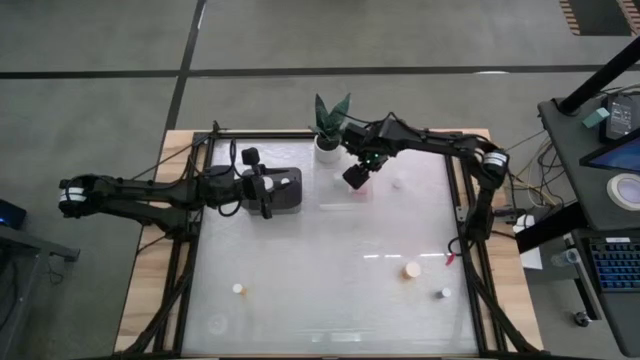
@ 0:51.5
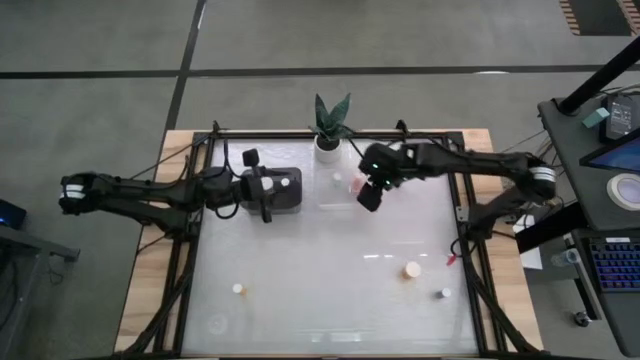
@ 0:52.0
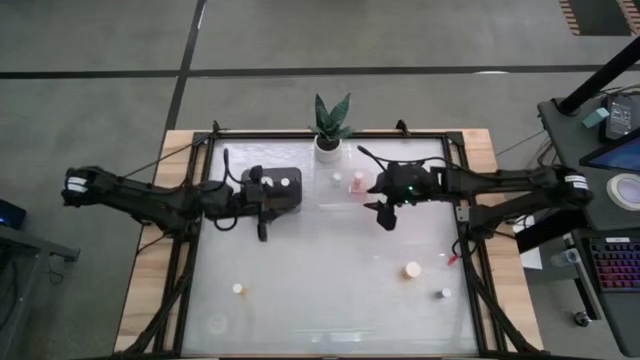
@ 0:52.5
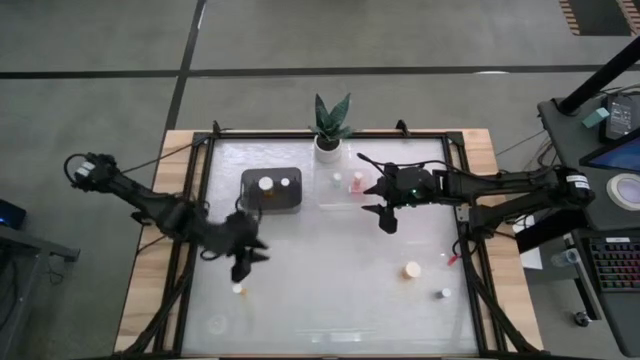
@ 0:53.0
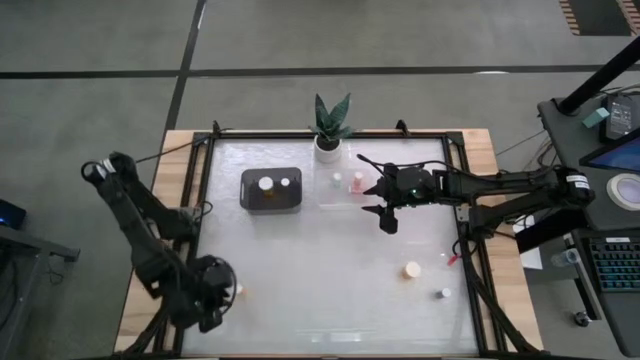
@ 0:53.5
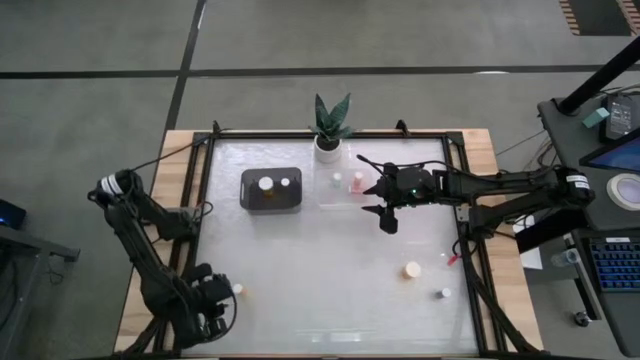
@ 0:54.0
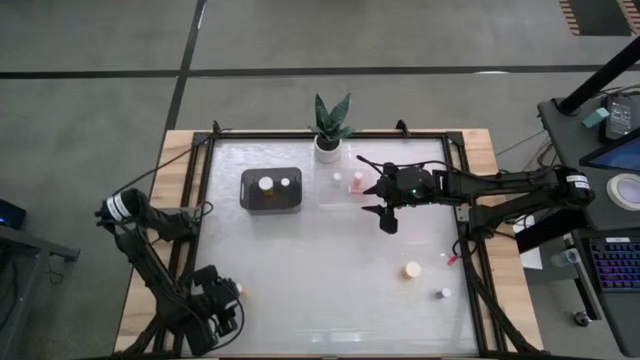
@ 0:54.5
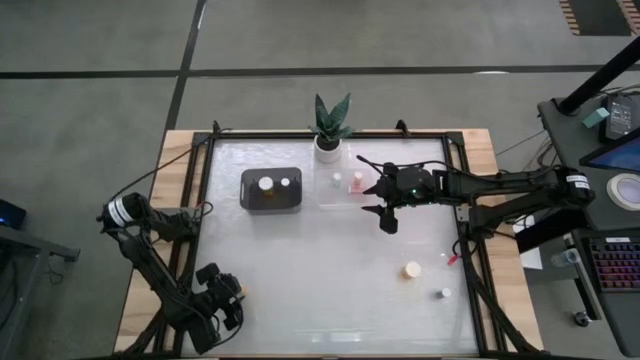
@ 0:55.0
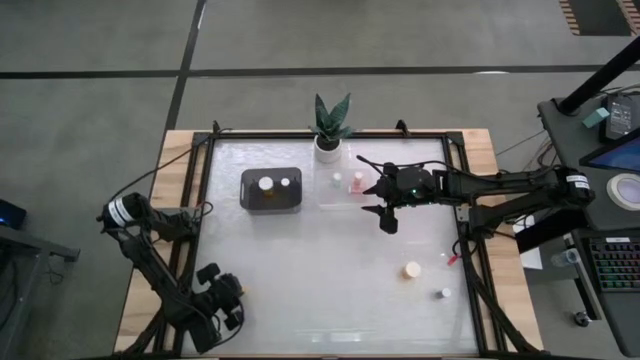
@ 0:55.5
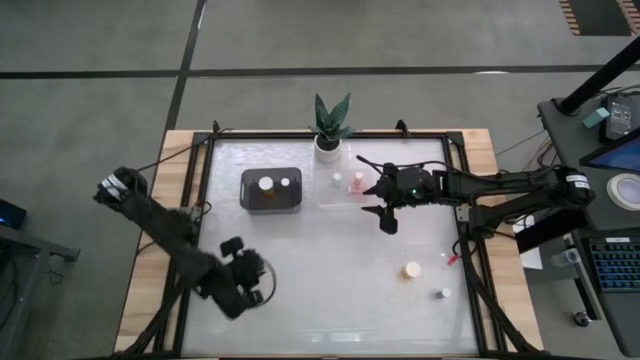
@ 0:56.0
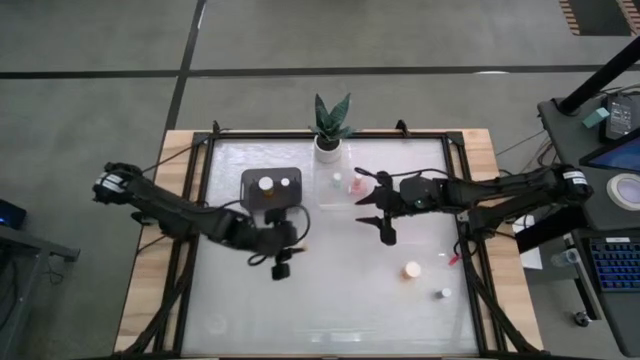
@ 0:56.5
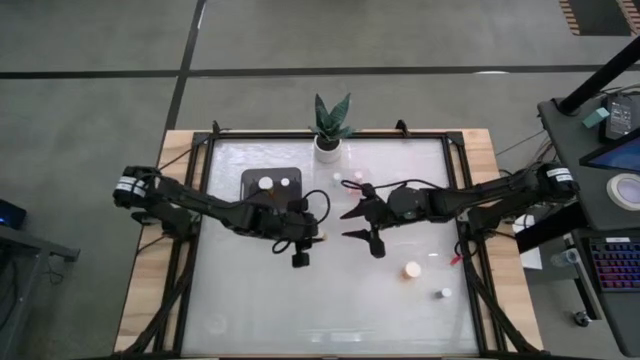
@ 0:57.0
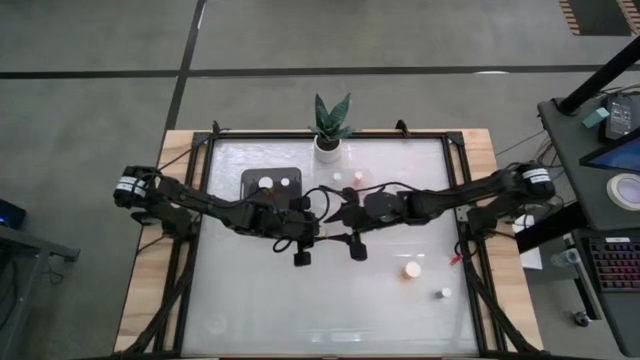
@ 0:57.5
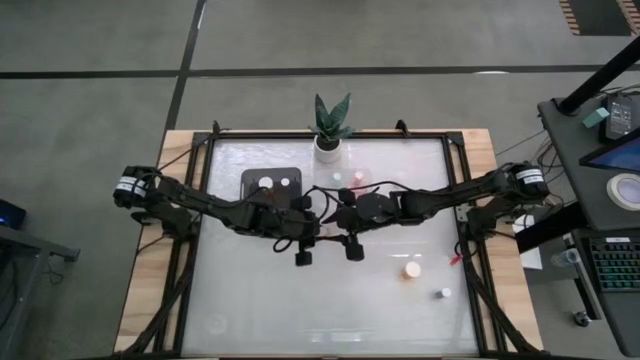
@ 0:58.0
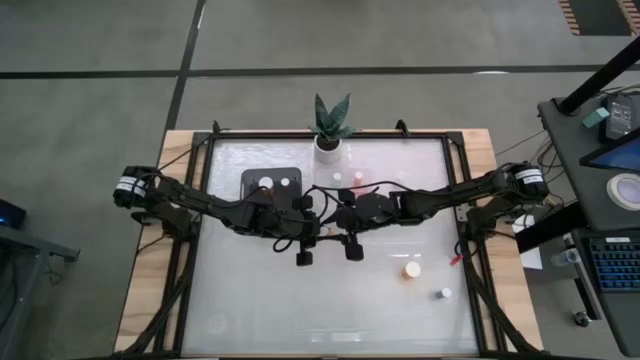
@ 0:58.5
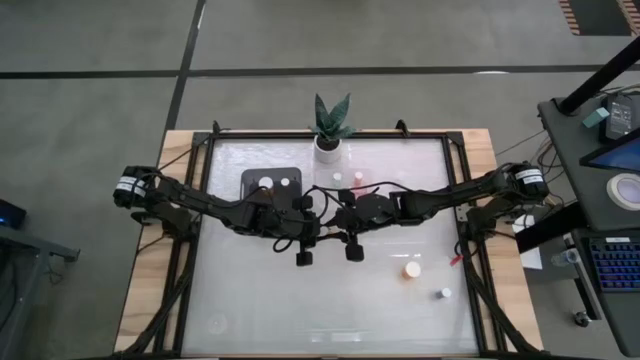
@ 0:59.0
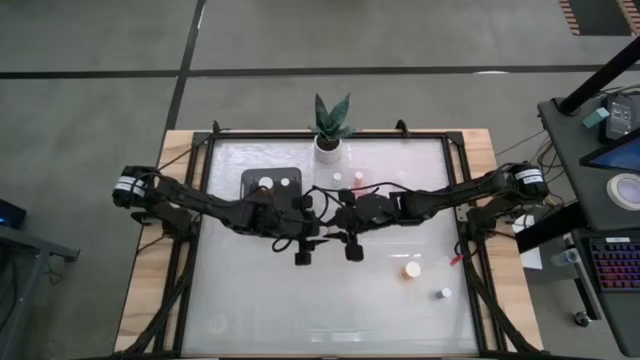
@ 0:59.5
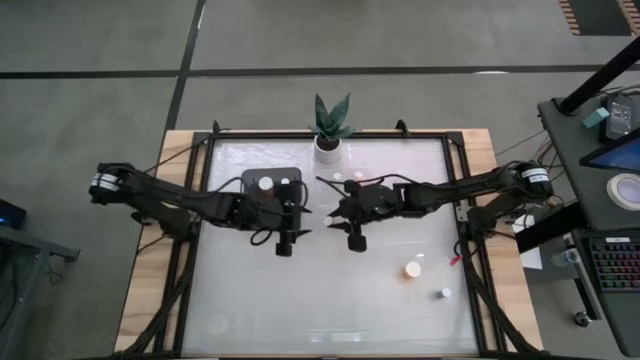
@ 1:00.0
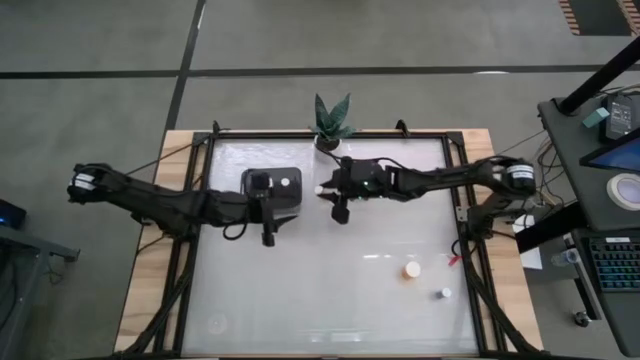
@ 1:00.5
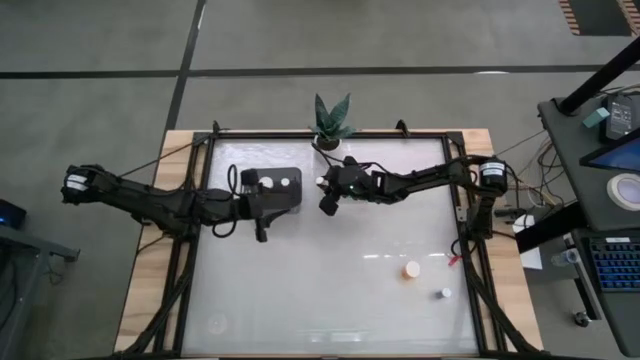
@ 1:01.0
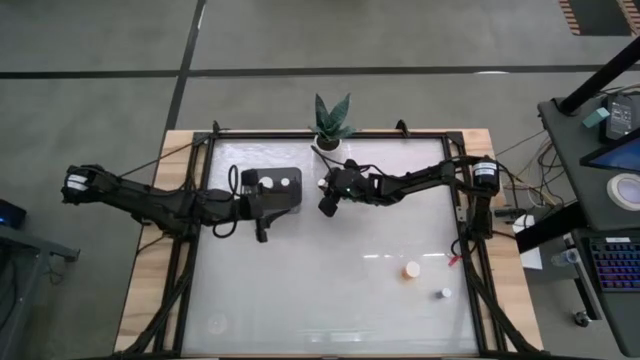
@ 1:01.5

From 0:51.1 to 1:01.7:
Task: Pick and place medicine bottles into bin by pill shape (circle, oval)
Put the small orange tablet bottle into the transparent bin

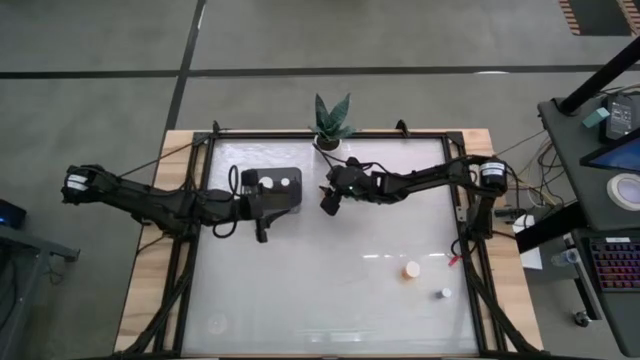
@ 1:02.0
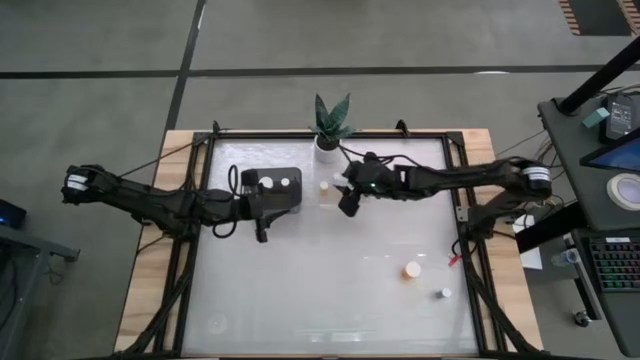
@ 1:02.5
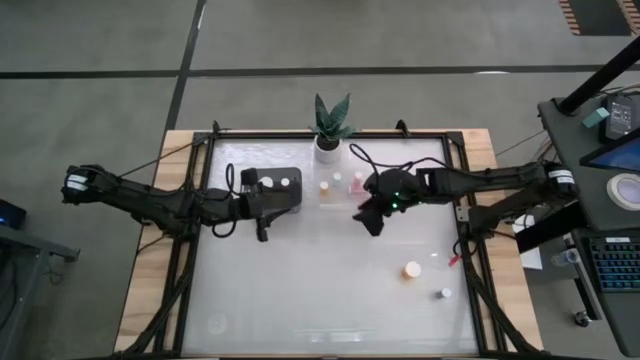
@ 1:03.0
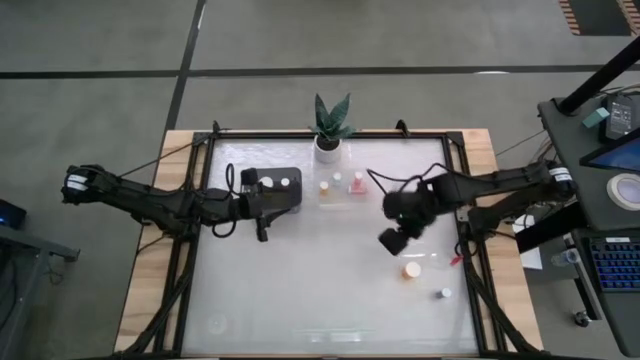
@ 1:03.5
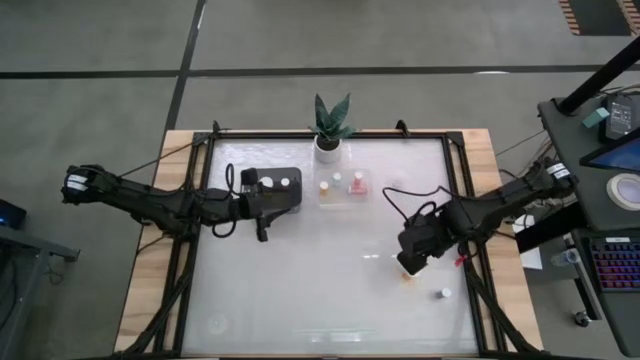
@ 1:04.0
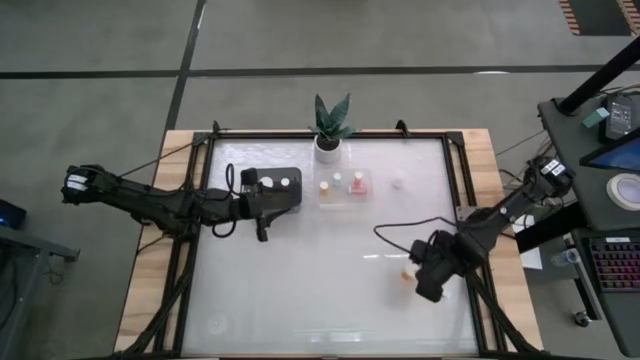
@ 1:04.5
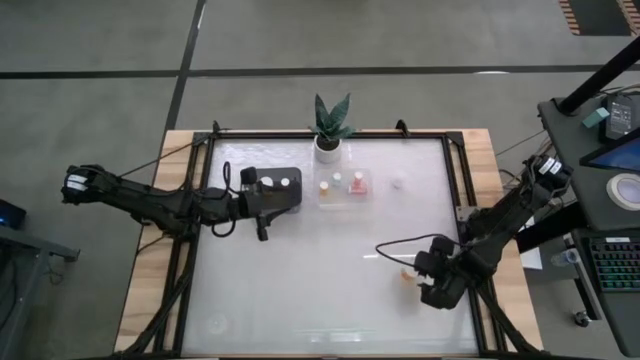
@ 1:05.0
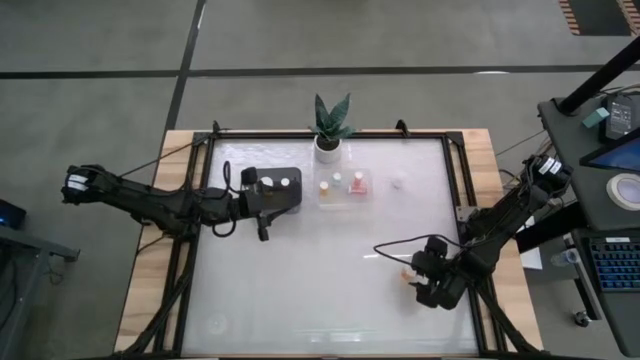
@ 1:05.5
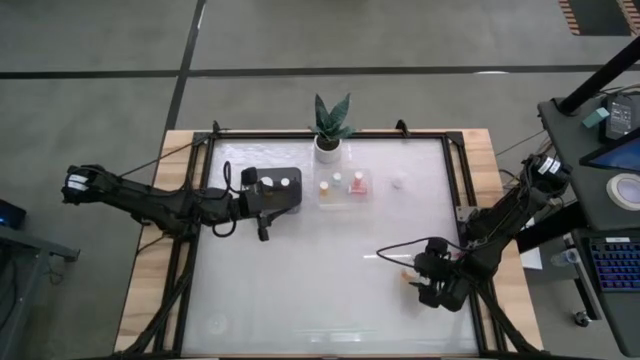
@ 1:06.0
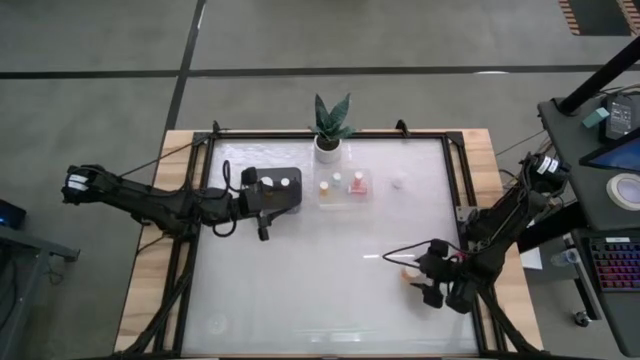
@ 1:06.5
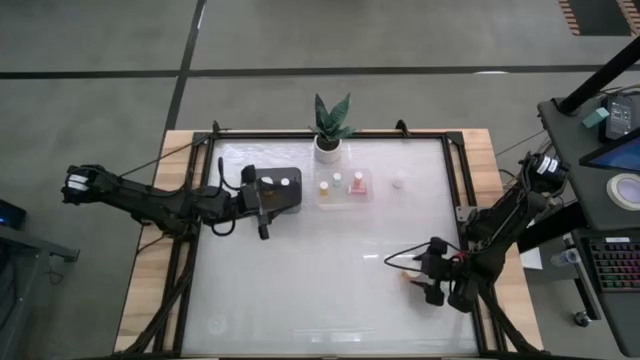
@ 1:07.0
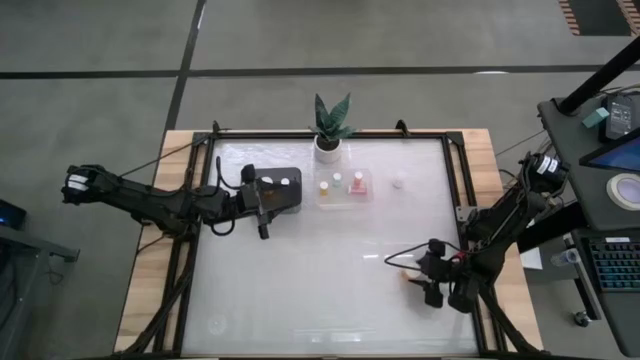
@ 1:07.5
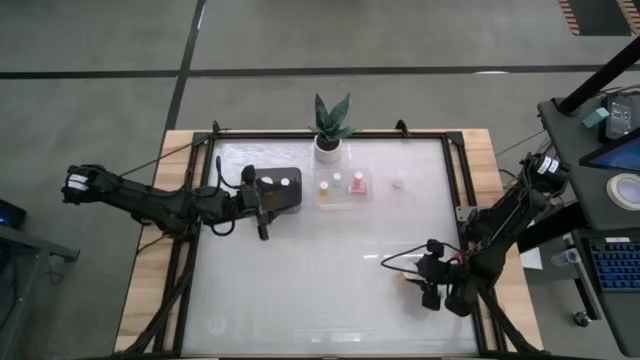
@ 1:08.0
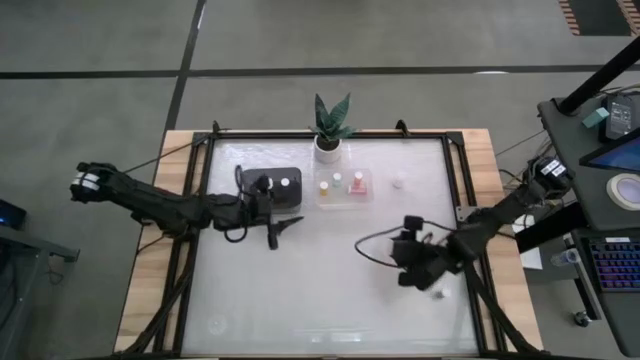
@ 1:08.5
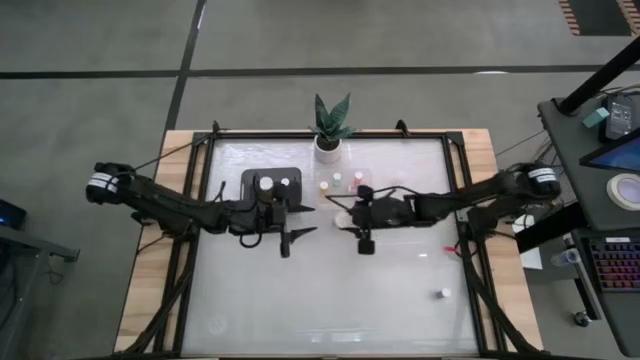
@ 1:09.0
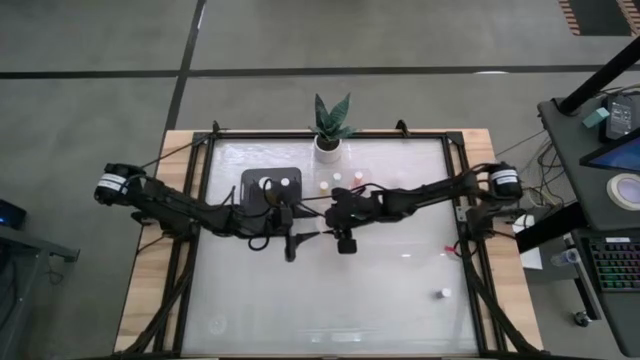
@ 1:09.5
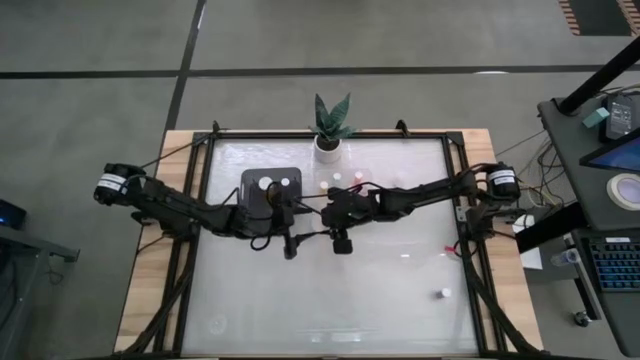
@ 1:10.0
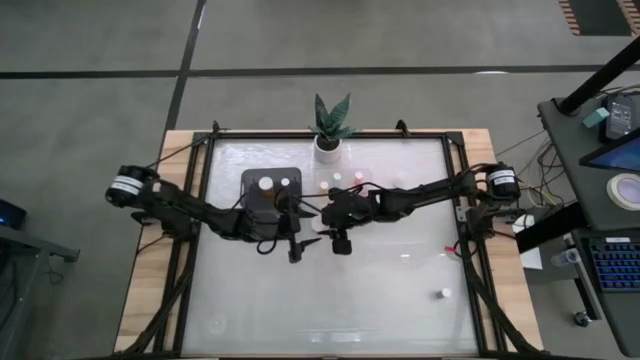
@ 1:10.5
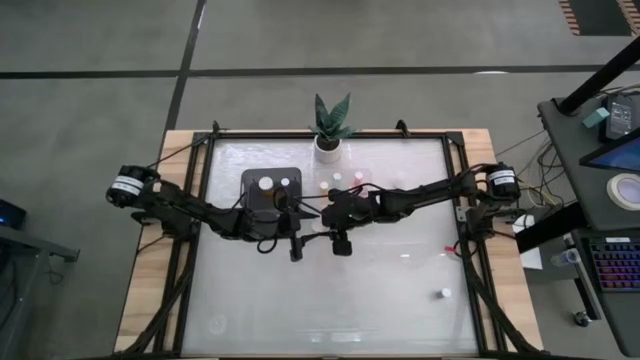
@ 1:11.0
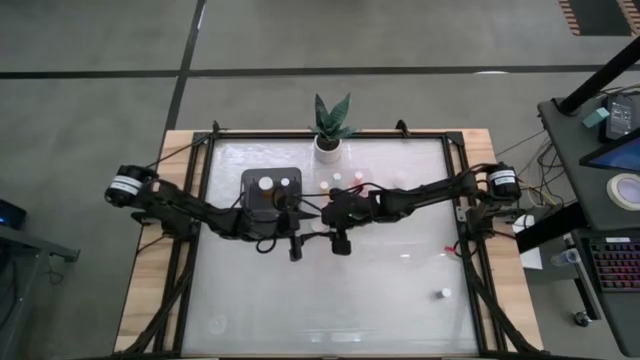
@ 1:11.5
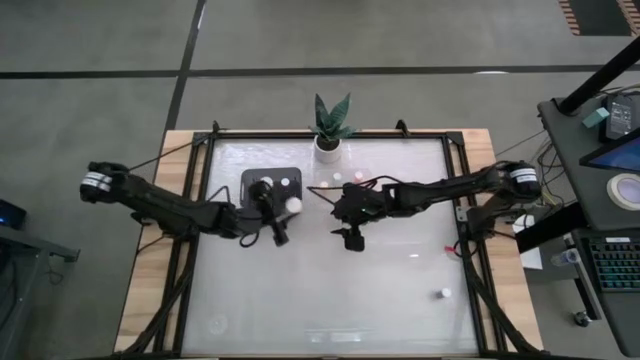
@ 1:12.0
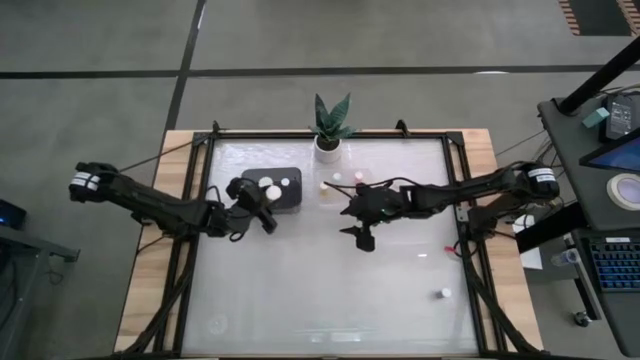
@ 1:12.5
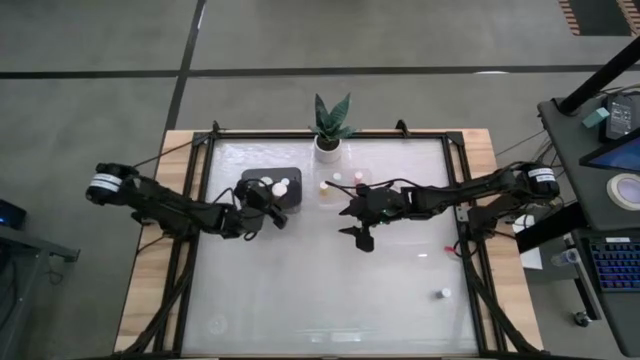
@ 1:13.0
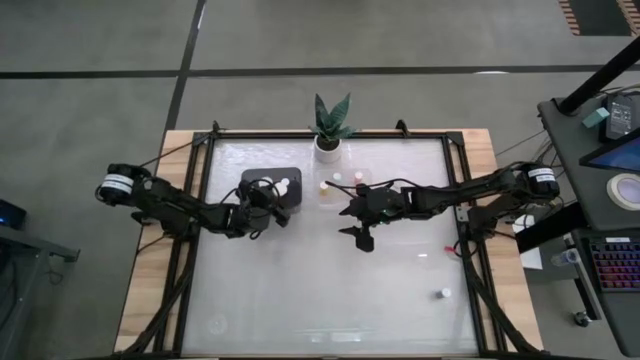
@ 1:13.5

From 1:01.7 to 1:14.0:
Put the large orange capsule bottle into the black bin
